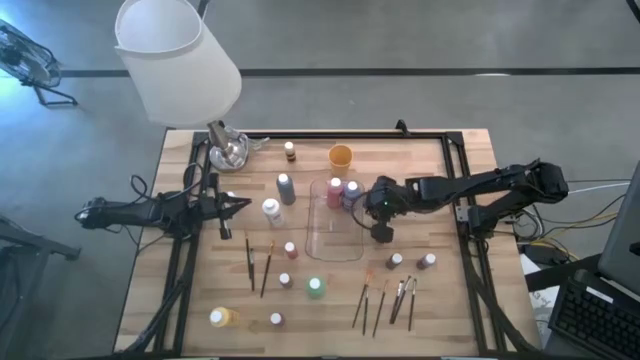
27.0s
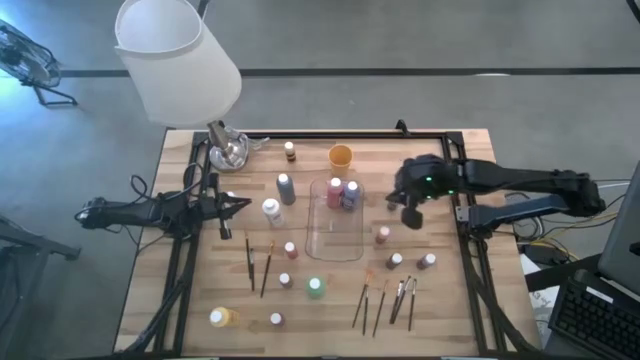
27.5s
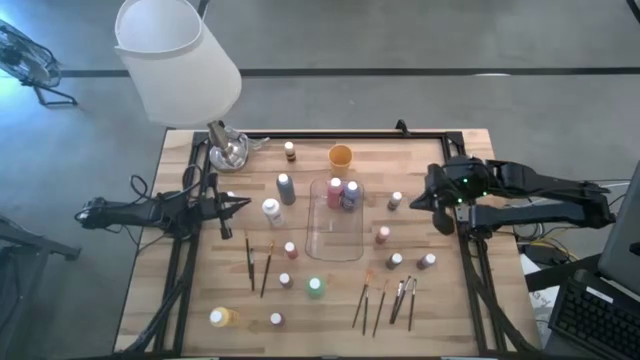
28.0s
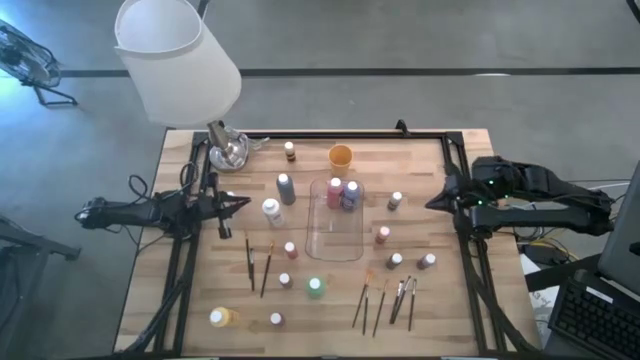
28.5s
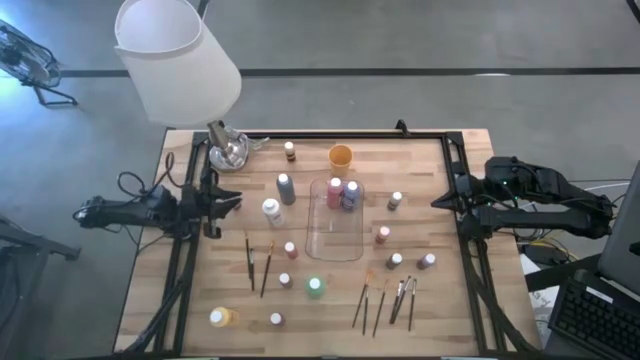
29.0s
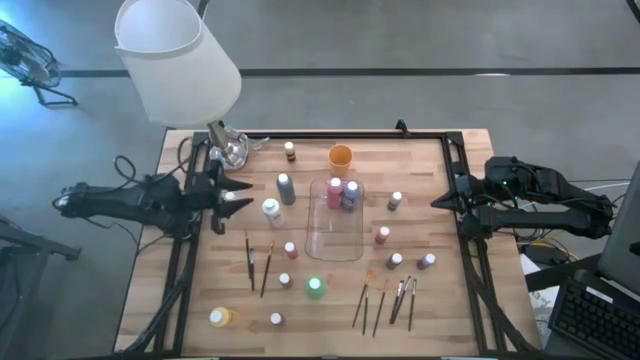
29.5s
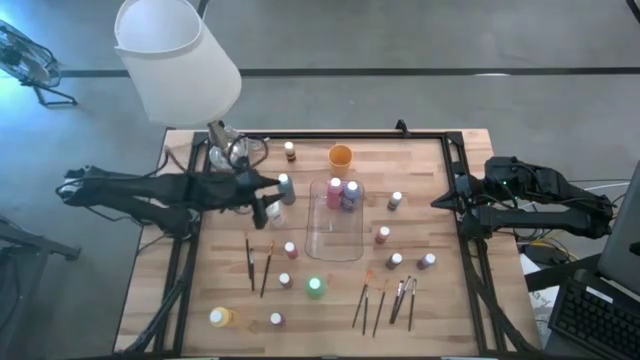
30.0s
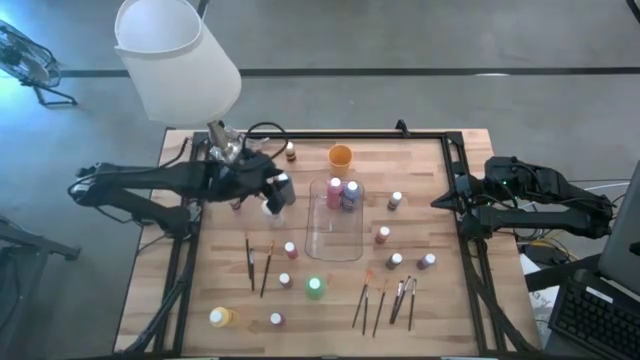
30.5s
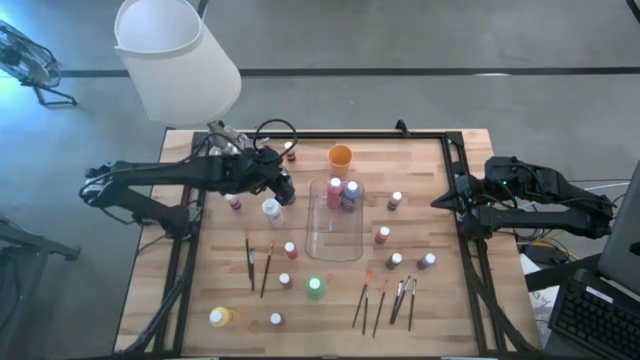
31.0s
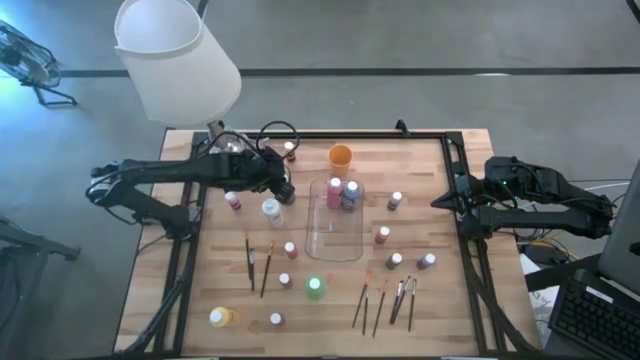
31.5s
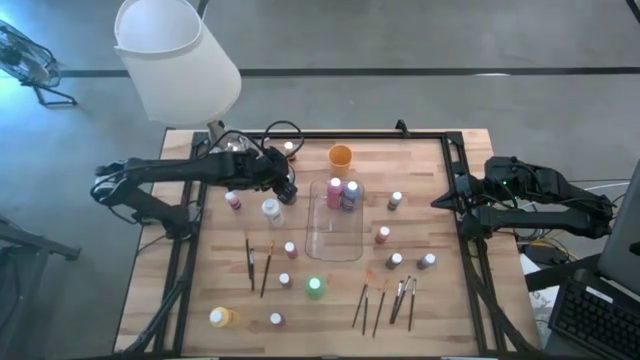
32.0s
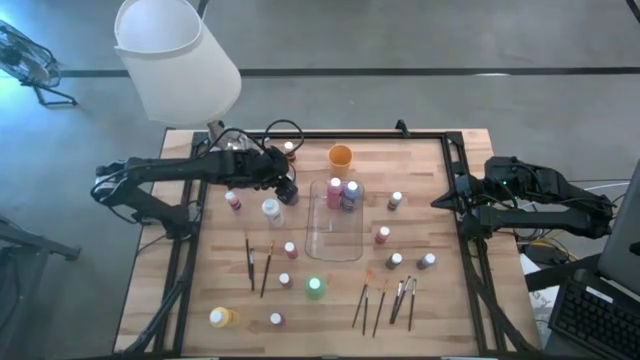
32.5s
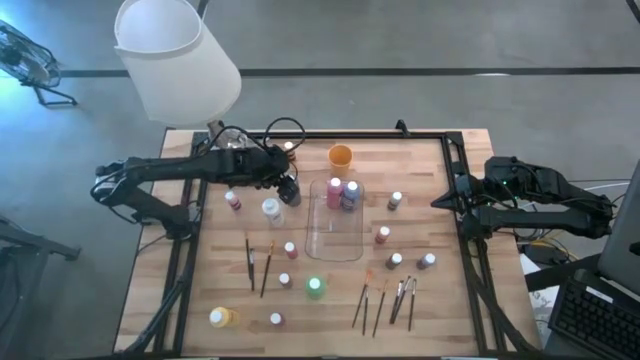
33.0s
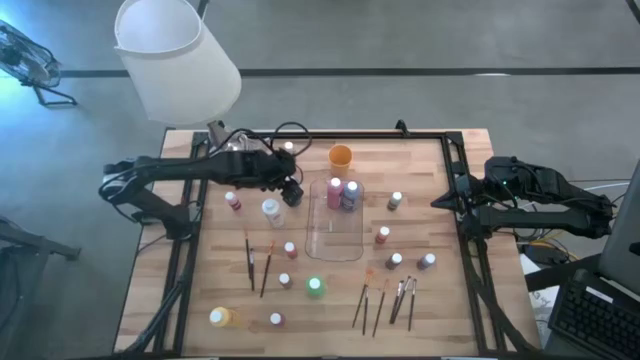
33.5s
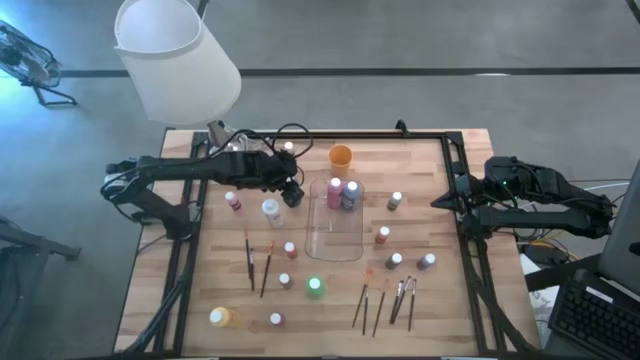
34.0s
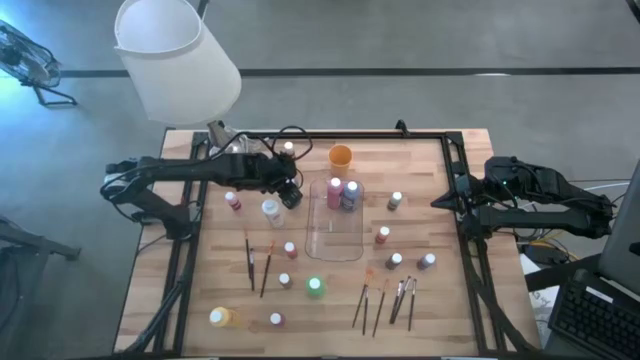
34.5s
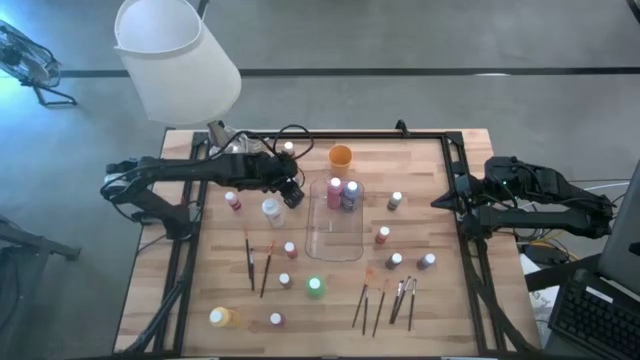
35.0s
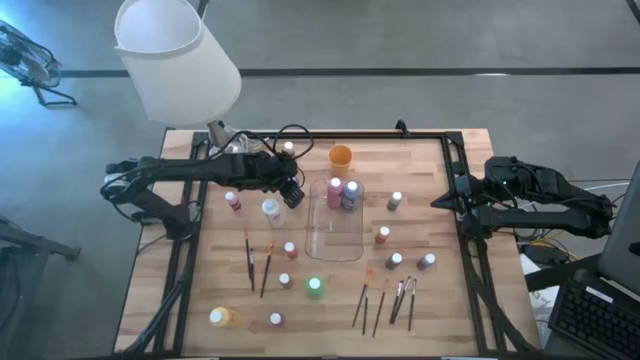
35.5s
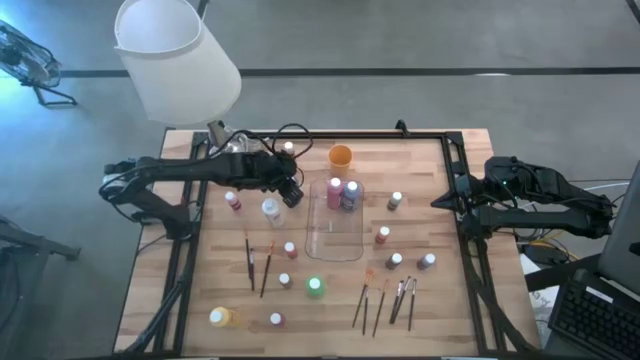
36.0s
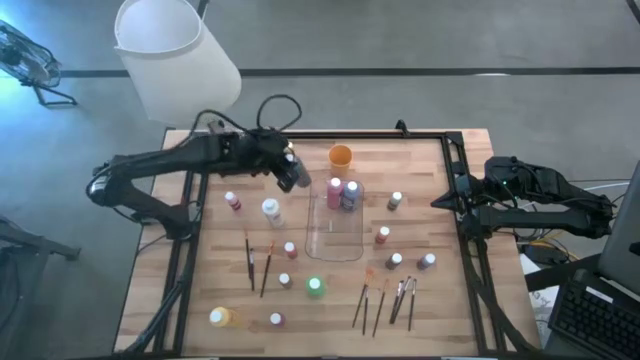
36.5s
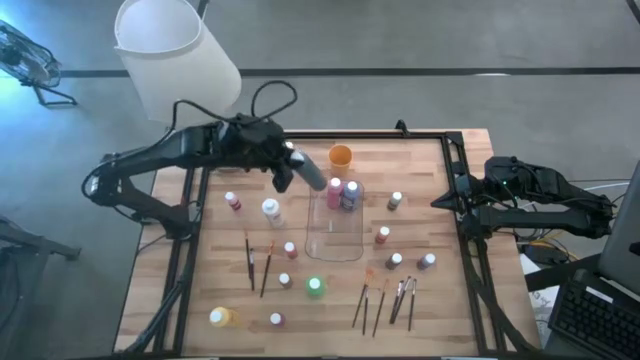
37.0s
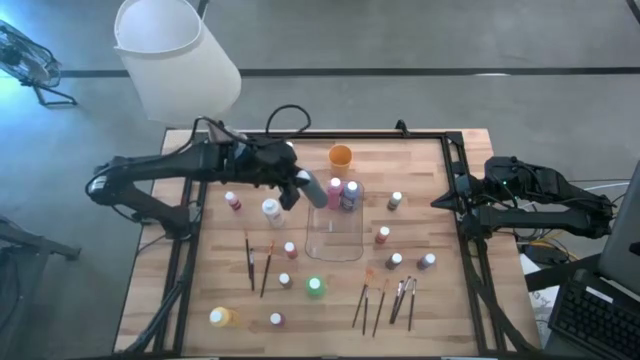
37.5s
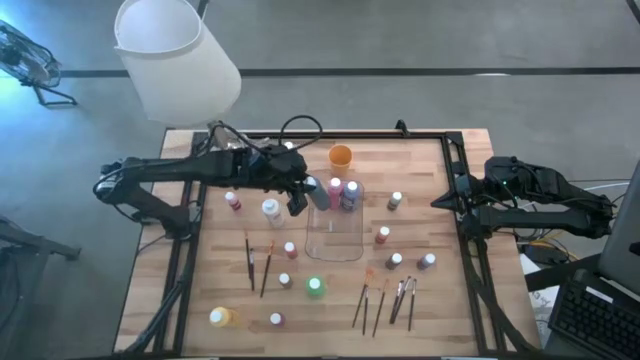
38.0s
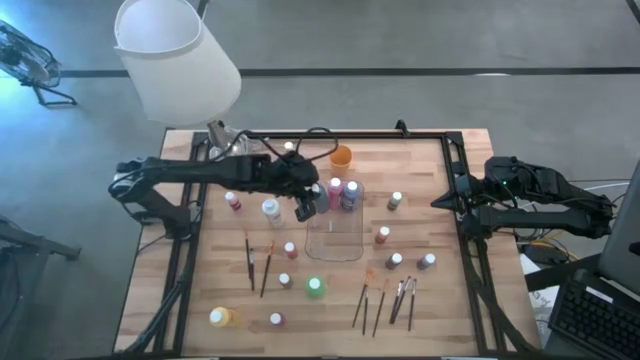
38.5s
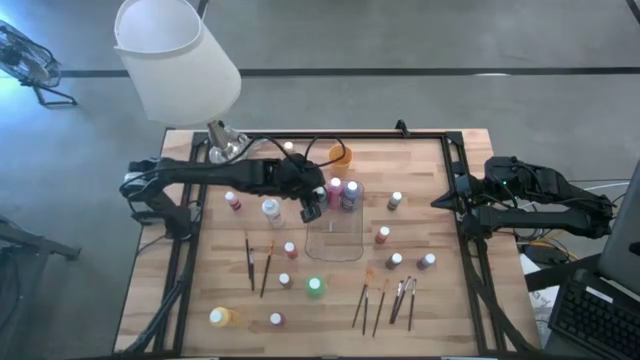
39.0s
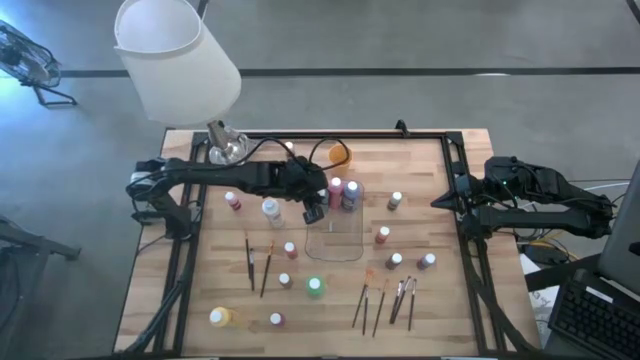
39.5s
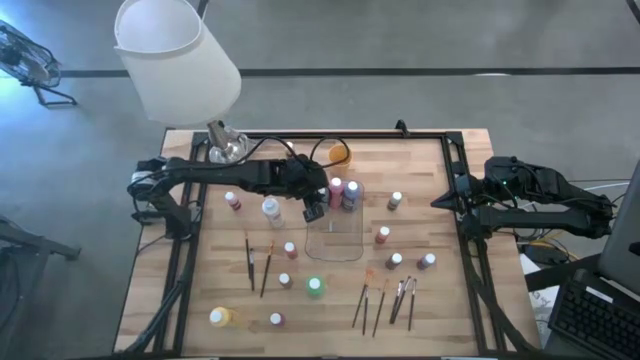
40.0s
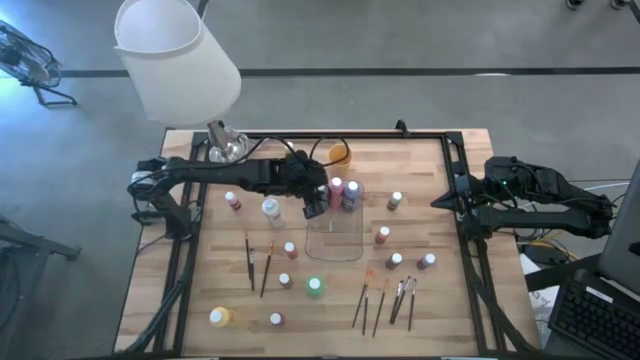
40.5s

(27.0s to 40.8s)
Task: Pick & Place Paint Supplies
Put the dark green paint bottle into the transparent bin

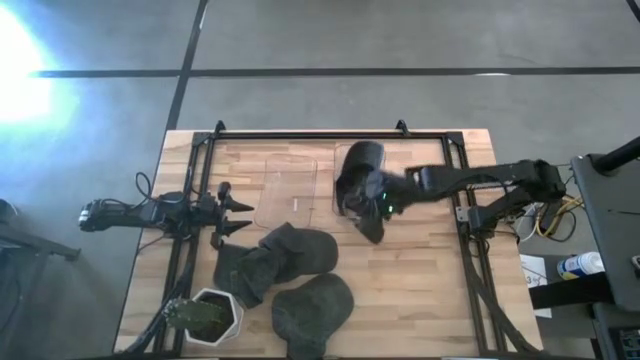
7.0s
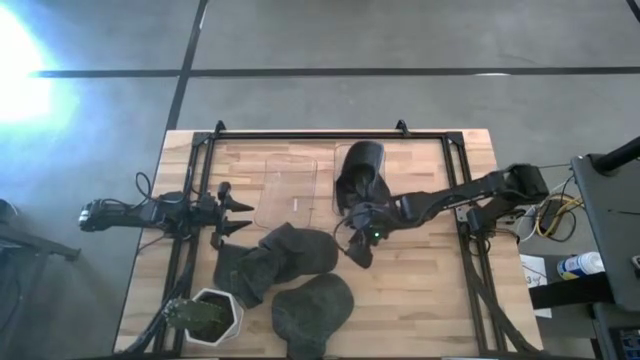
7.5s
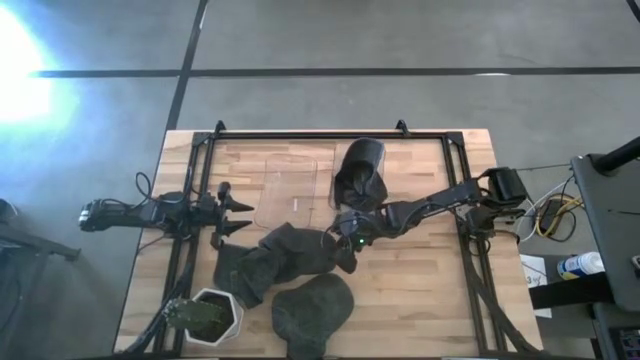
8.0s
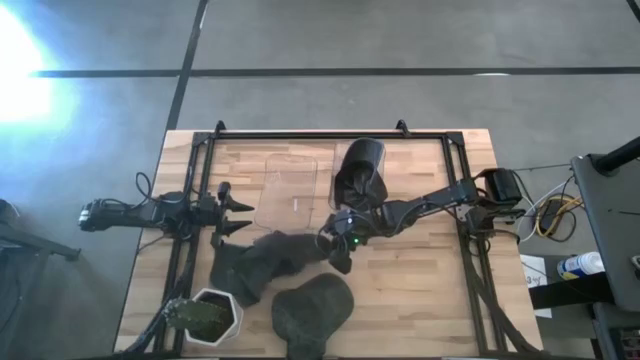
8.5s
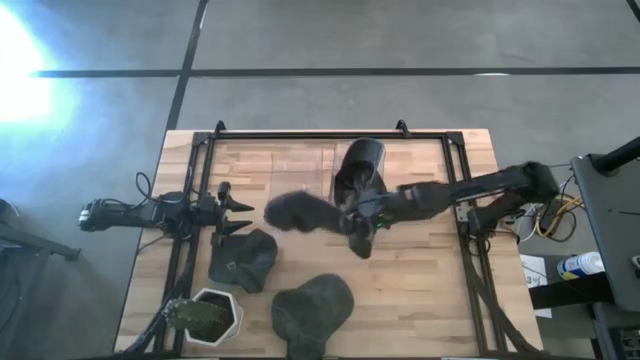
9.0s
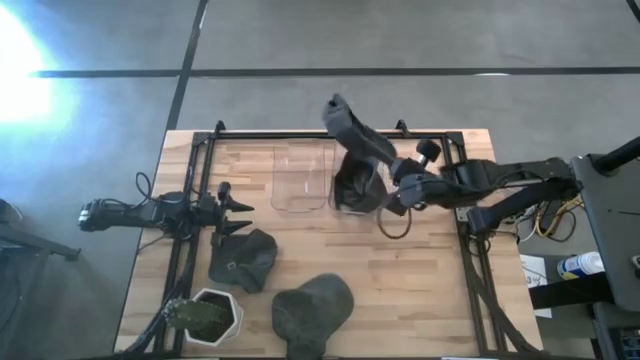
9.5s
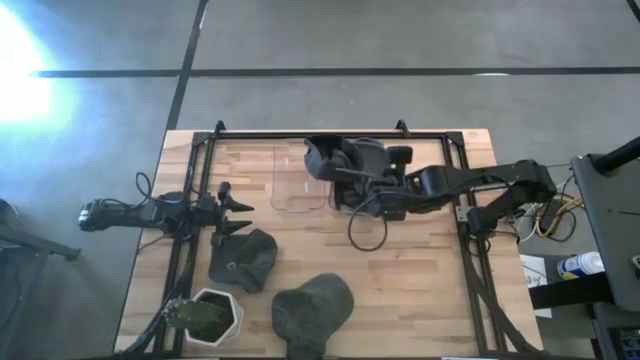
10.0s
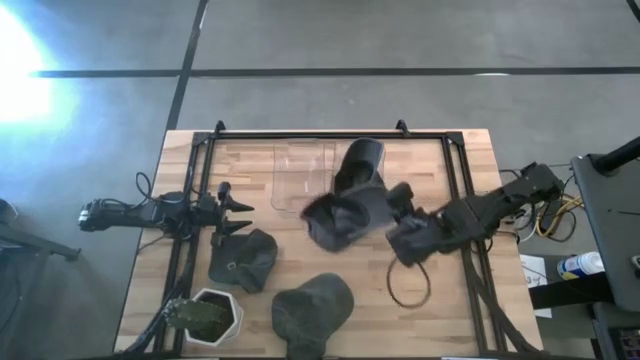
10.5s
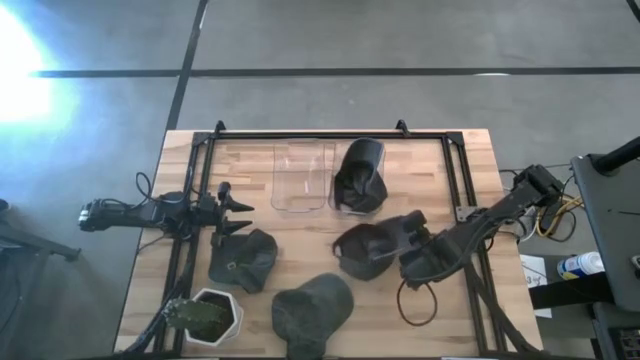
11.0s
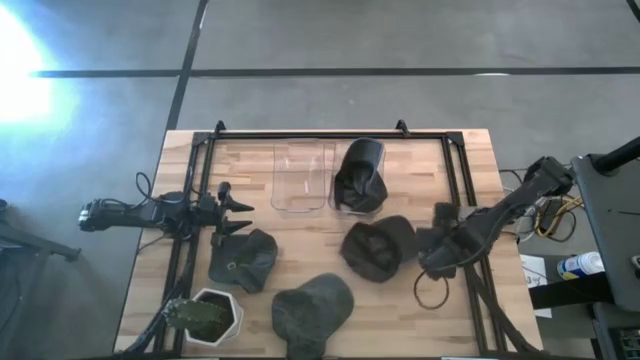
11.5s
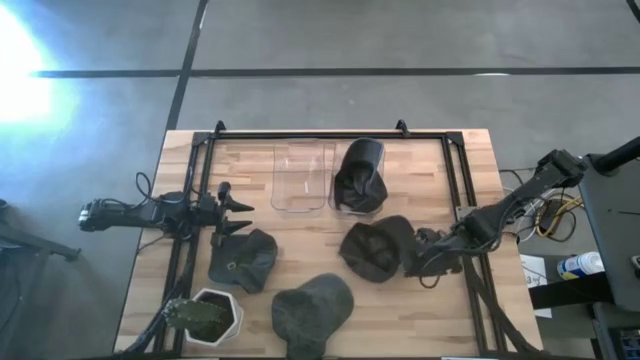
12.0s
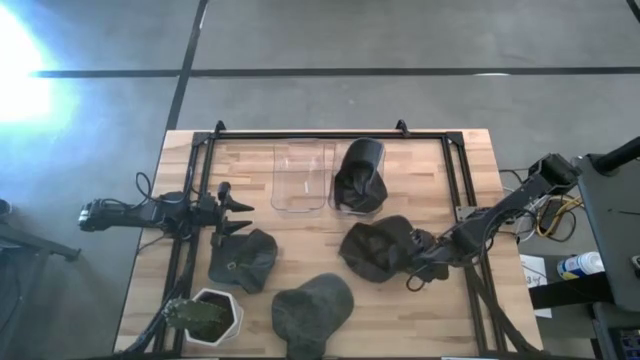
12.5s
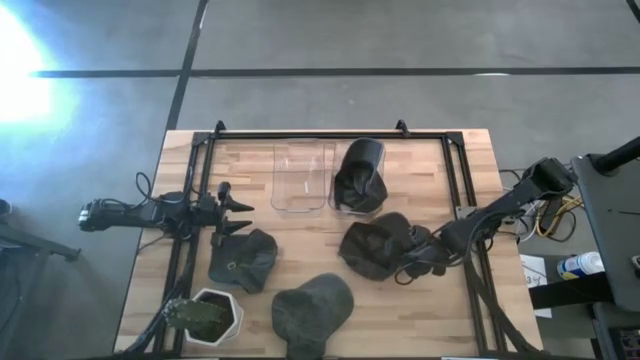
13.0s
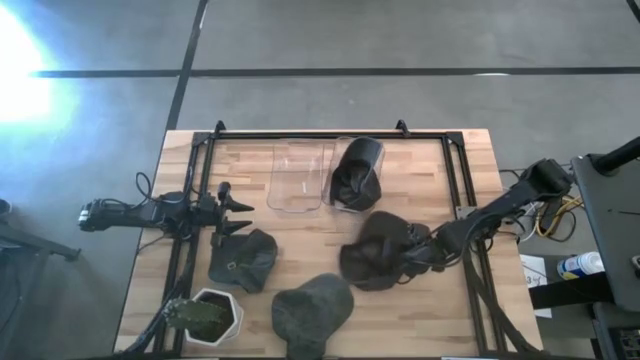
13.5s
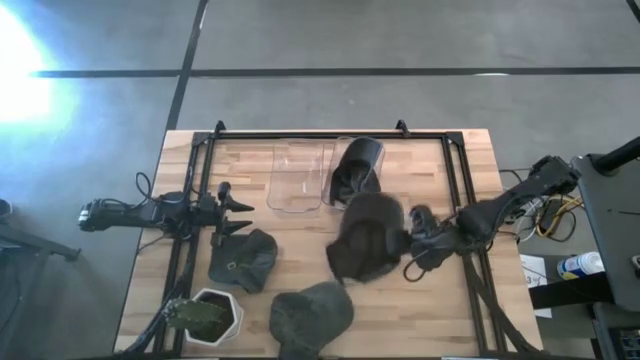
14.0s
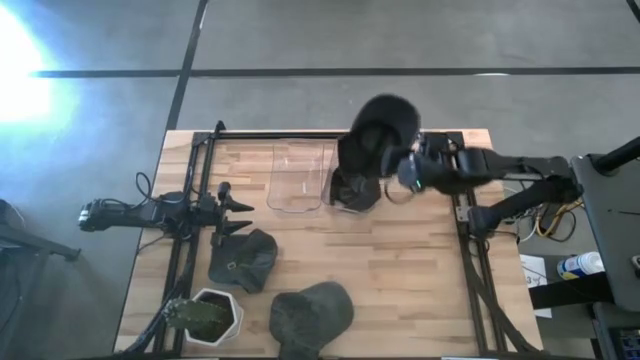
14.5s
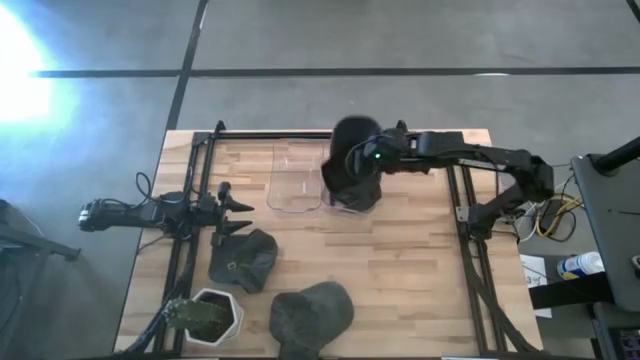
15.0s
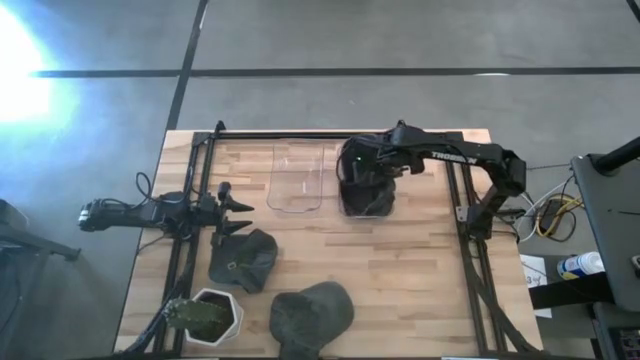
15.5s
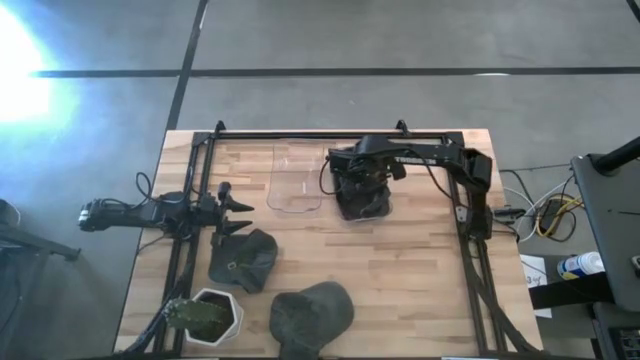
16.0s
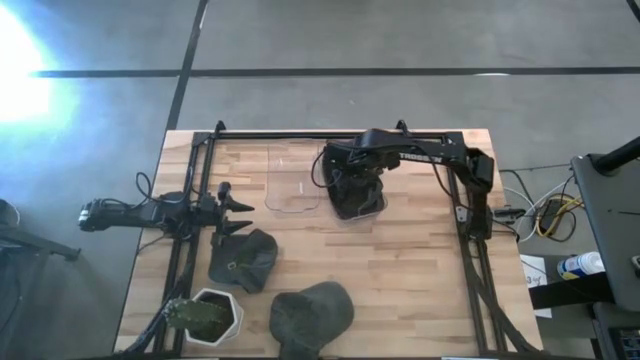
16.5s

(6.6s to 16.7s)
Task: Pick & Place hat
Put the black cap into the right transparent bin
